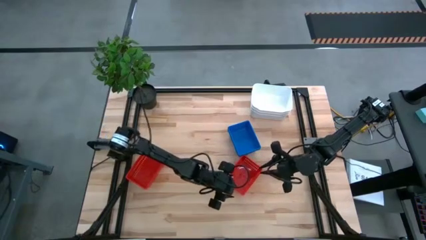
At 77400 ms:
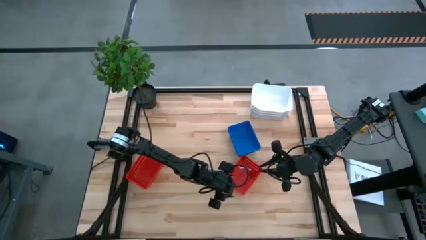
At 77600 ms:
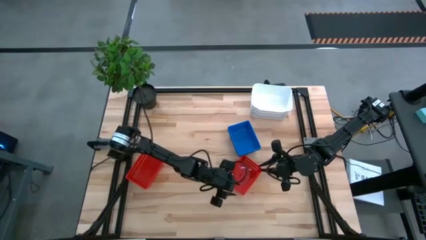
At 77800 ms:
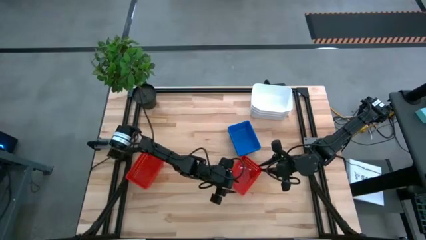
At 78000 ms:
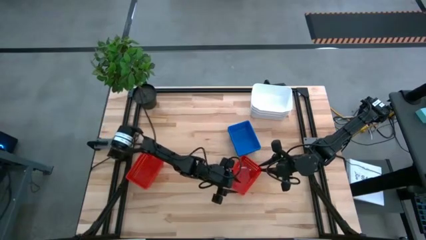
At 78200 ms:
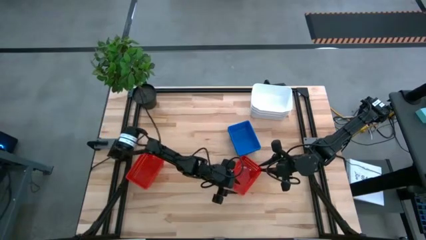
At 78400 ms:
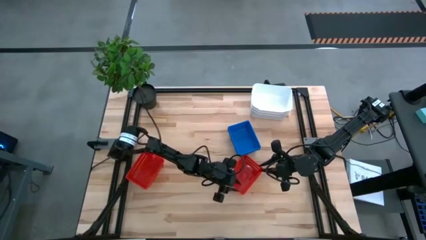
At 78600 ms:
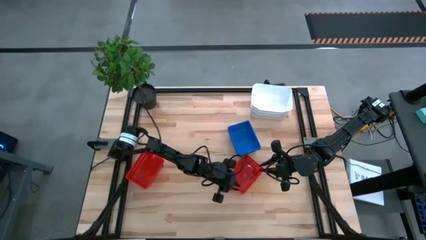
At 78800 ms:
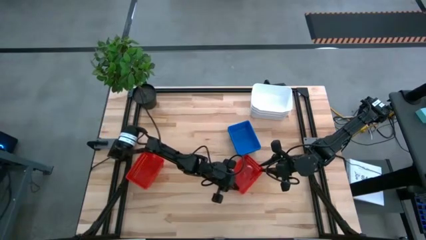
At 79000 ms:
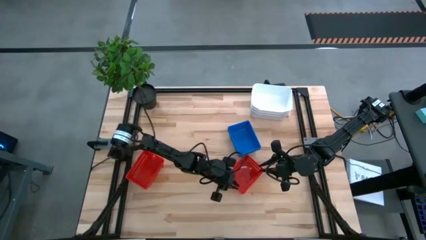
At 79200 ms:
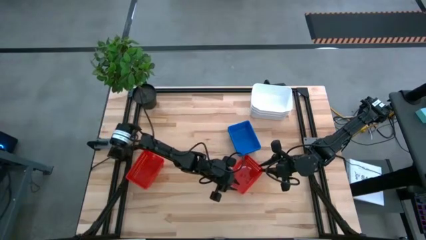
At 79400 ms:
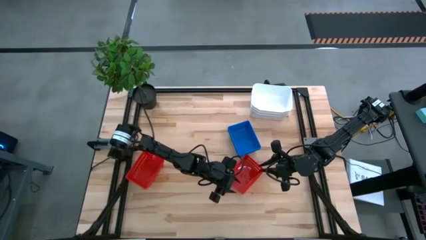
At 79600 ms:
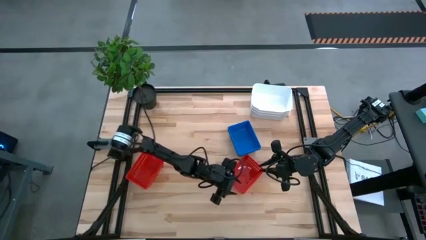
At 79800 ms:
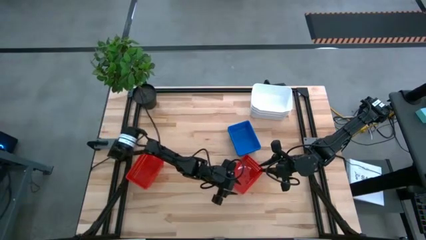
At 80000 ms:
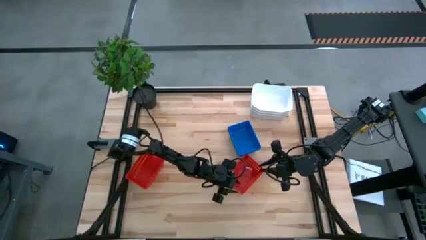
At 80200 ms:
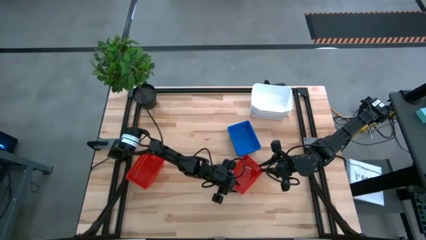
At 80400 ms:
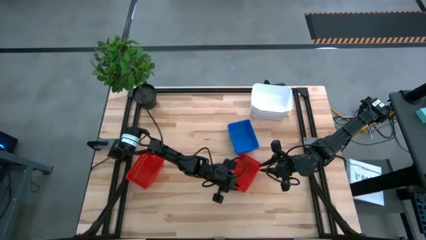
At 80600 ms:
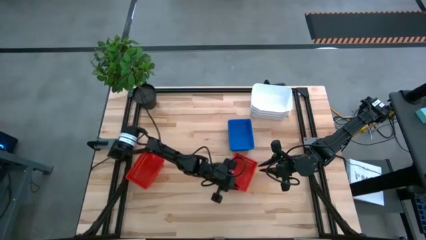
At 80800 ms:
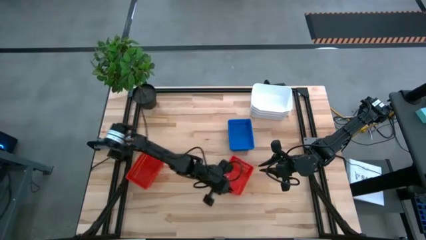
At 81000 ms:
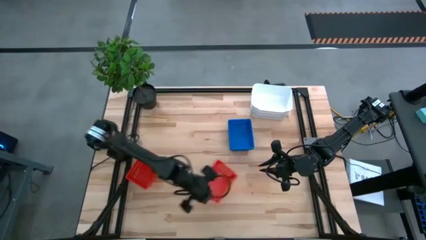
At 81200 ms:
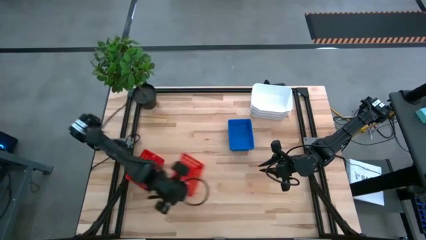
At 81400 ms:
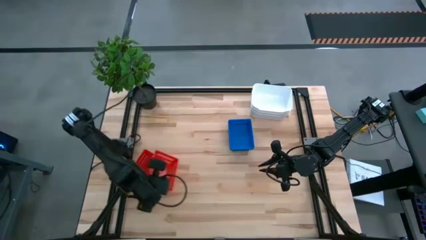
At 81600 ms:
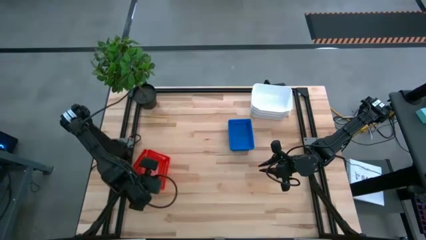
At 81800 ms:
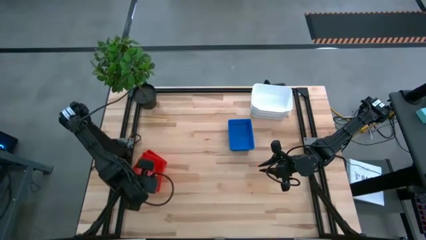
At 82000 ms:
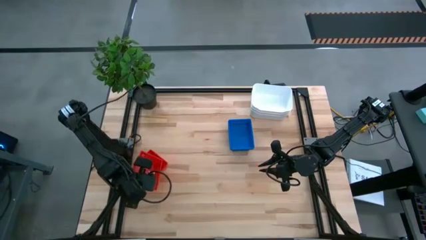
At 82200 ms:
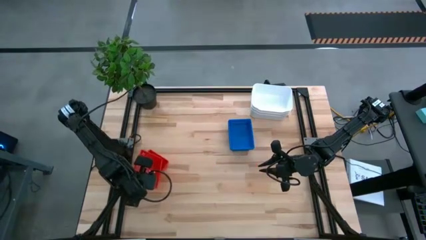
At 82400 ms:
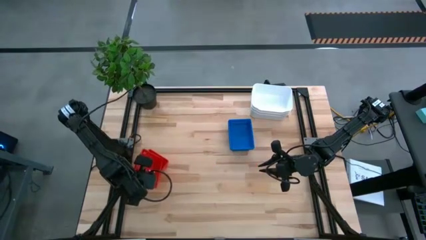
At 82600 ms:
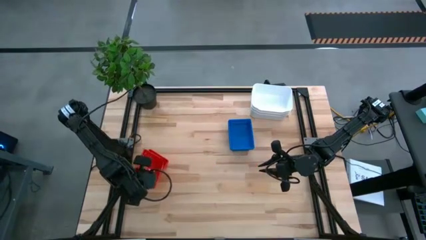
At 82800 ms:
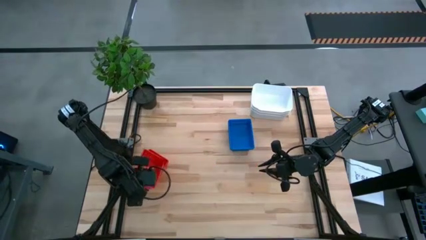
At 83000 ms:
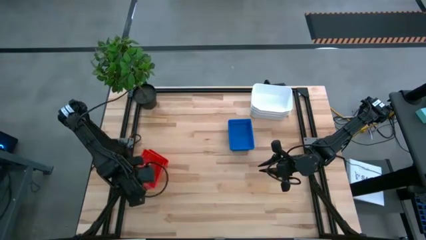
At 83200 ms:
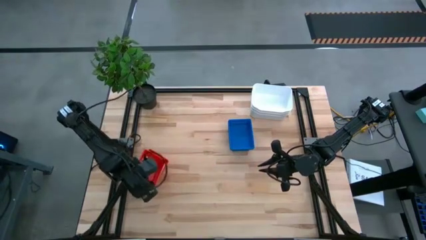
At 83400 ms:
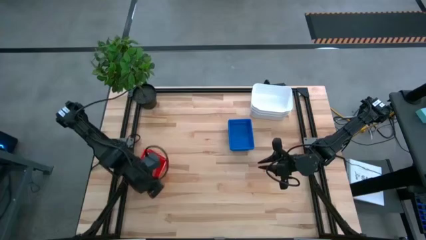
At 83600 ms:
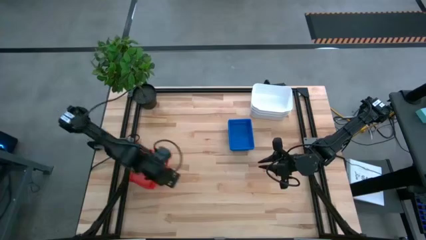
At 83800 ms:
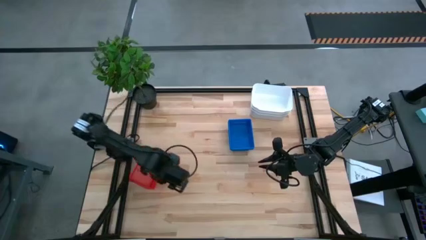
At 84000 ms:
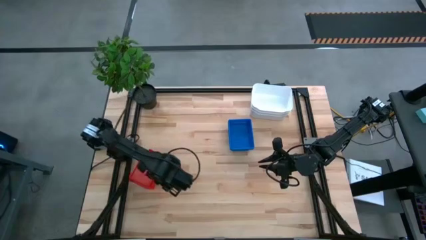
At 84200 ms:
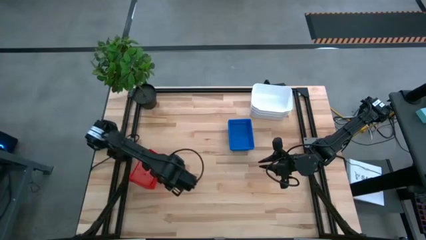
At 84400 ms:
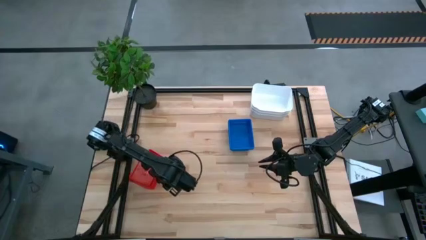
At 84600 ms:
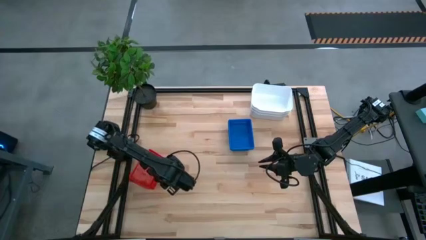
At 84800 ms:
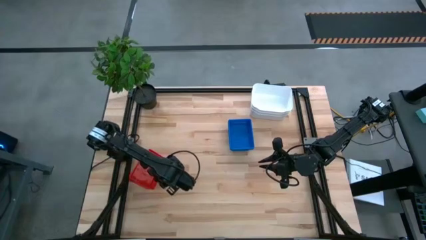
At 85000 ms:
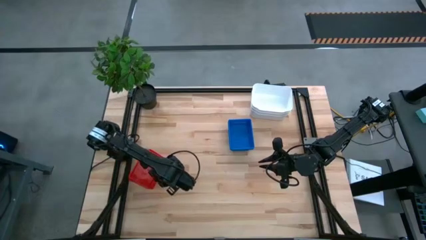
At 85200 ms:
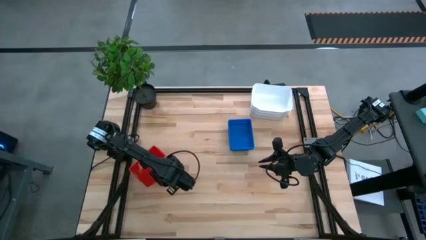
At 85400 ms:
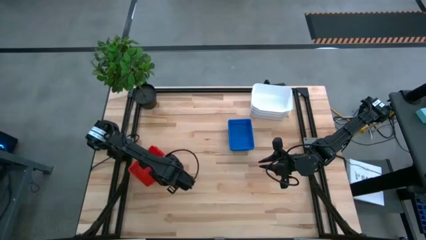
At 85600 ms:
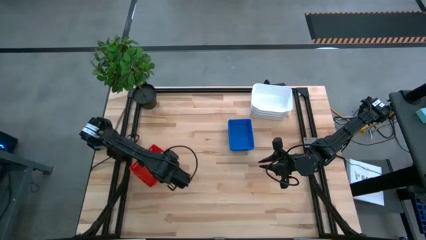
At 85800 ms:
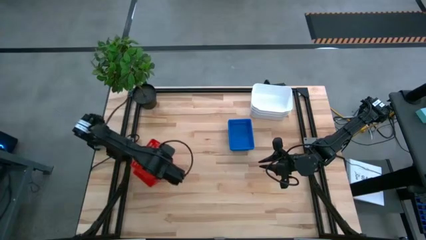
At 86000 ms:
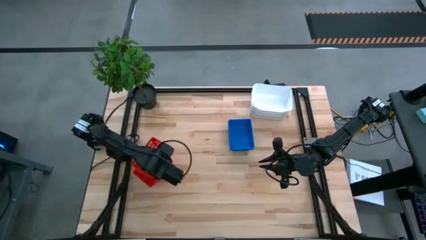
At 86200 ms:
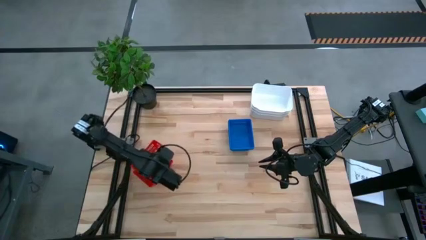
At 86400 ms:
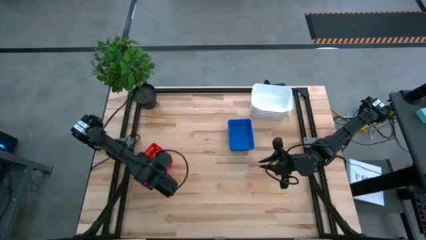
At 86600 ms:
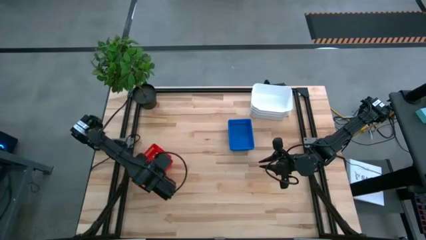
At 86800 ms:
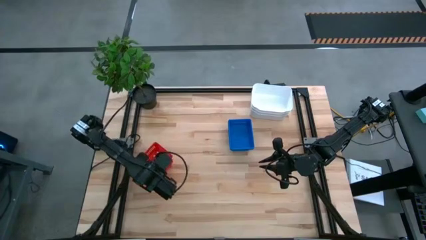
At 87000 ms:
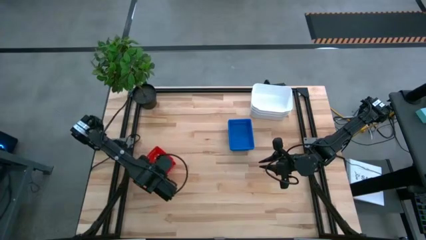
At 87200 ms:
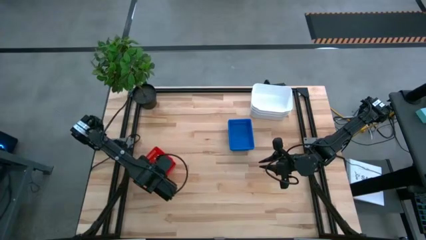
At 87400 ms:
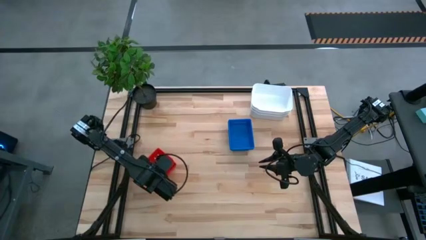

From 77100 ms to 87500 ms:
Stack the right red bin on the stacked red bin

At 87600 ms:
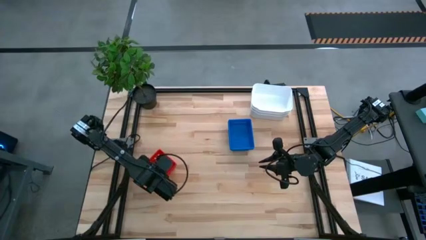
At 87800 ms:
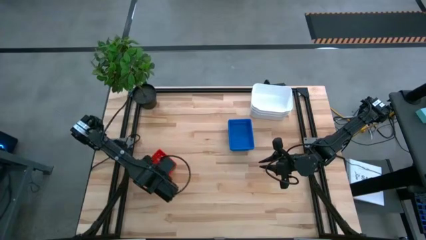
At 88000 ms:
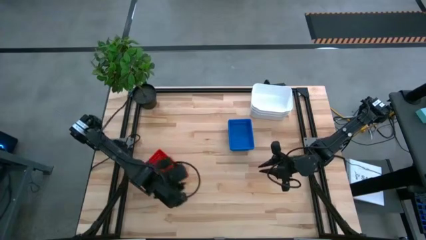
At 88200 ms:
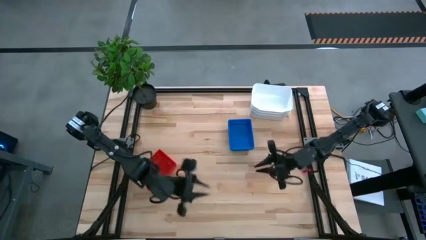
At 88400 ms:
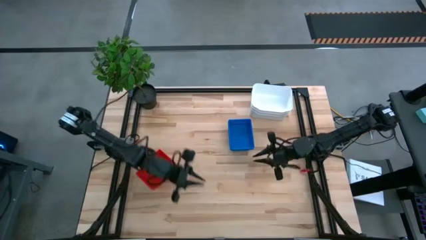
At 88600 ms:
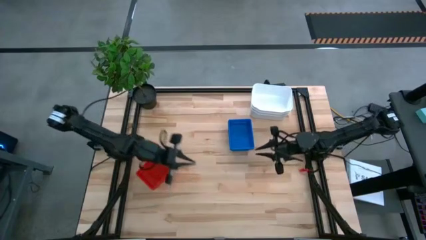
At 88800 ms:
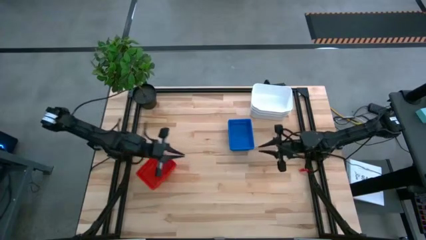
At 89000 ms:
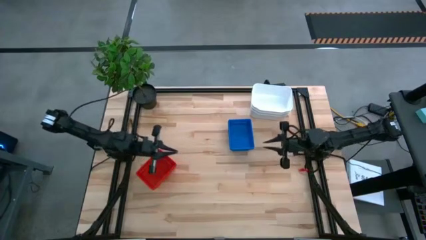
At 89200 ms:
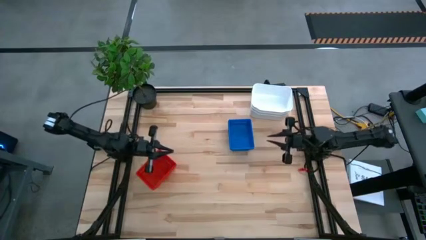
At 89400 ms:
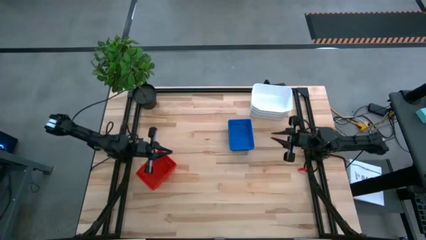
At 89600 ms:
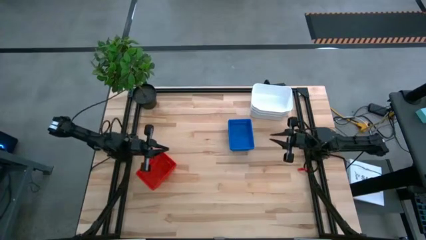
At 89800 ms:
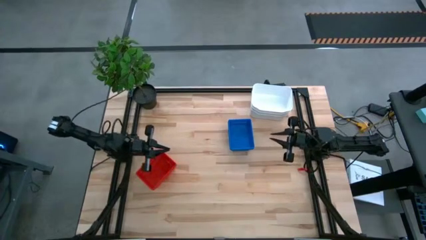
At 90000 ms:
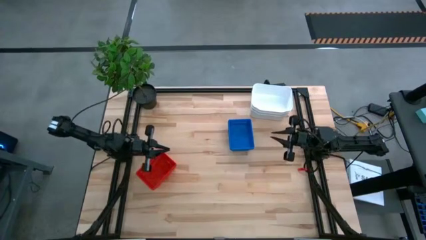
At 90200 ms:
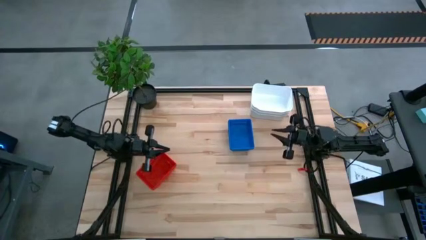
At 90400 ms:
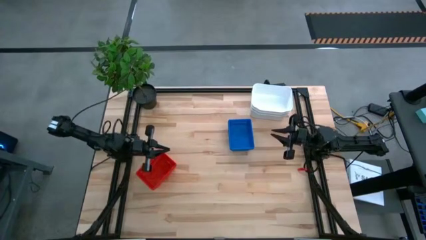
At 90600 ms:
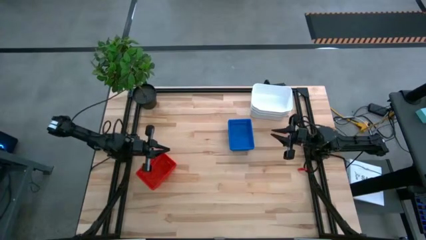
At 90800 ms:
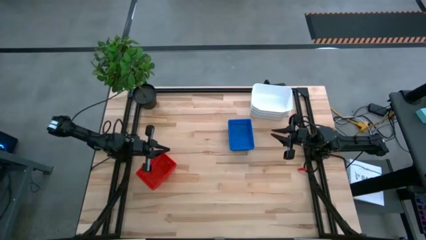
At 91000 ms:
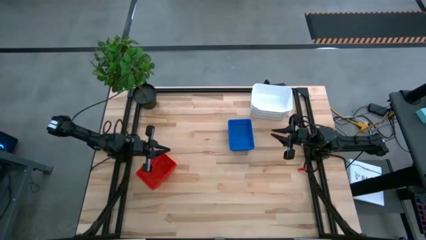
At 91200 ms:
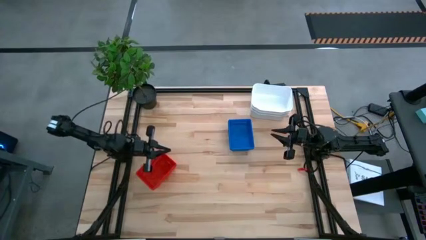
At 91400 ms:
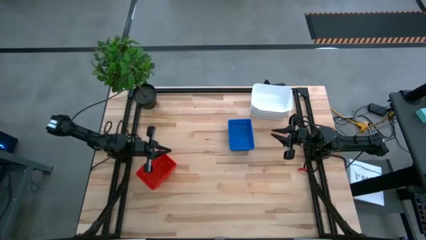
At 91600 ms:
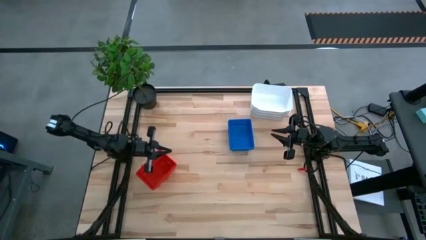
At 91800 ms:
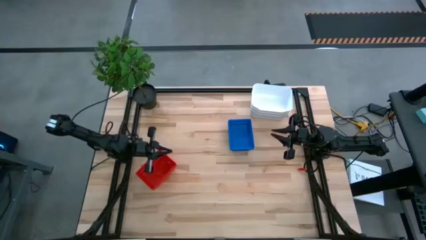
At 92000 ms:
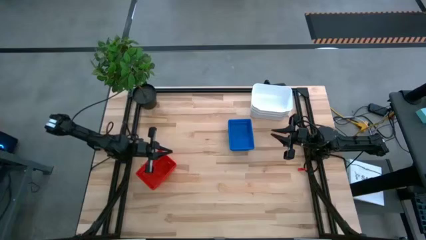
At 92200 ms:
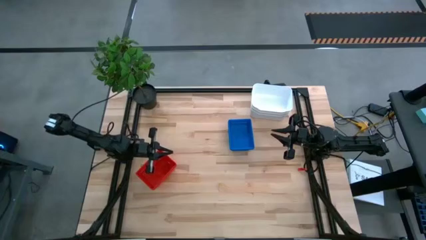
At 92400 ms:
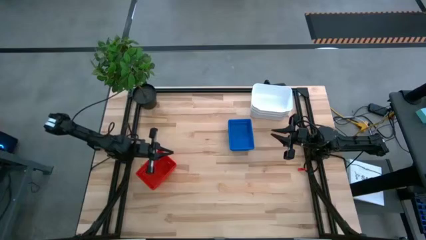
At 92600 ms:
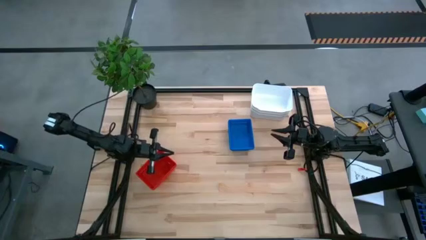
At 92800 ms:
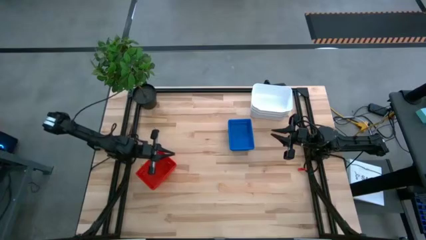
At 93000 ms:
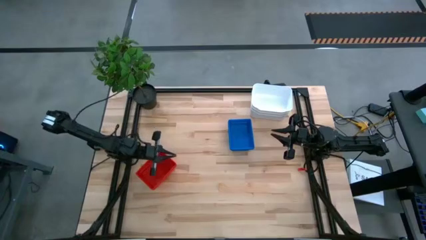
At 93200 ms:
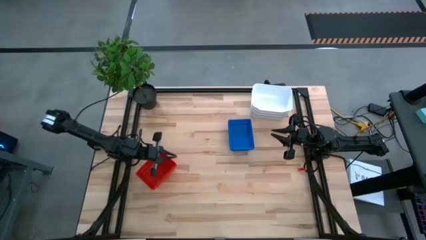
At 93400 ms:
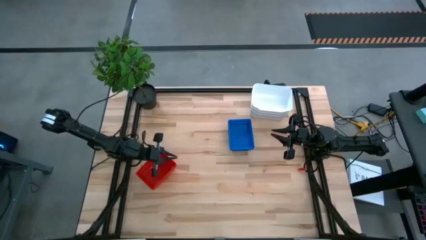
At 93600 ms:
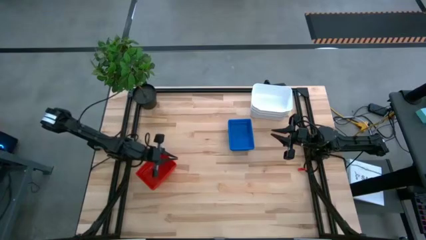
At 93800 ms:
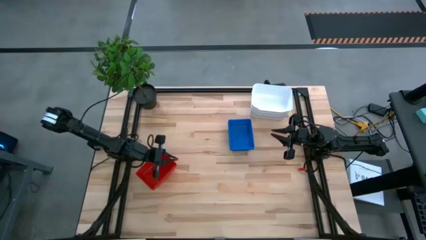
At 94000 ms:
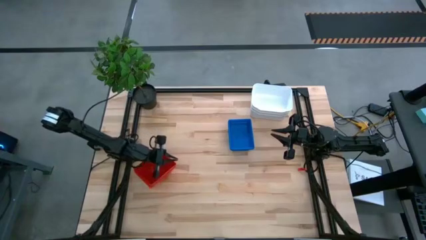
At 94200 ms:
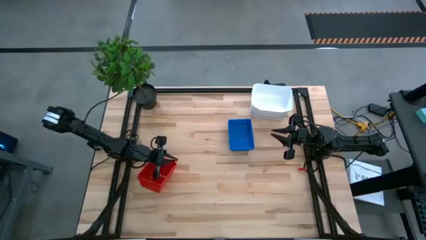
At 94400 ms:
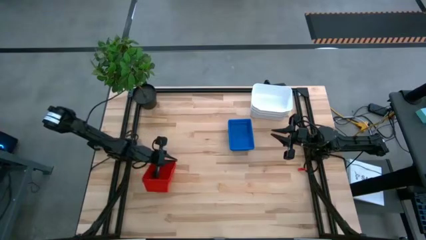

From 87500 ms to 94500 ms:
Return to Home Position
